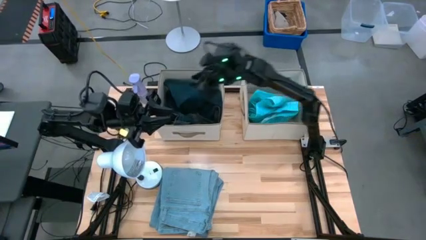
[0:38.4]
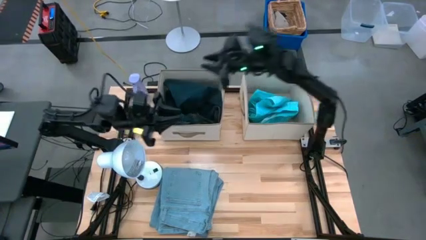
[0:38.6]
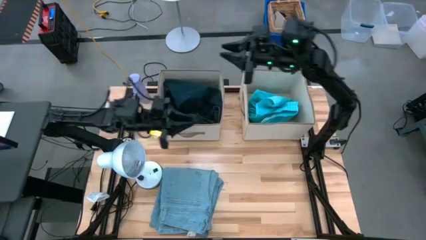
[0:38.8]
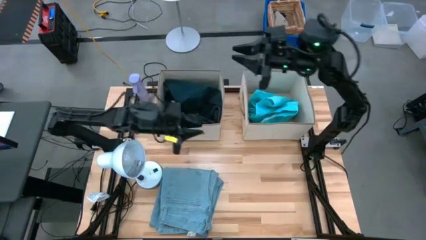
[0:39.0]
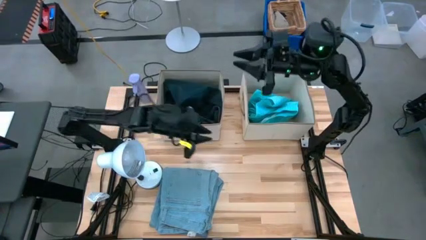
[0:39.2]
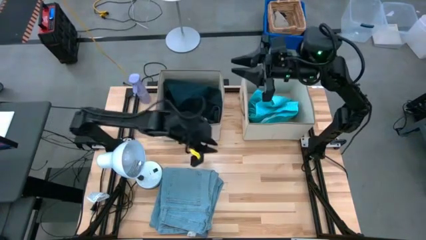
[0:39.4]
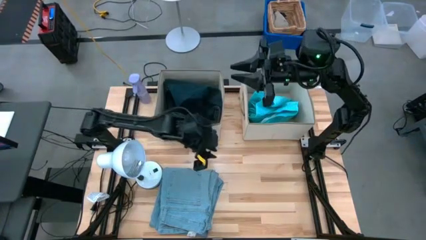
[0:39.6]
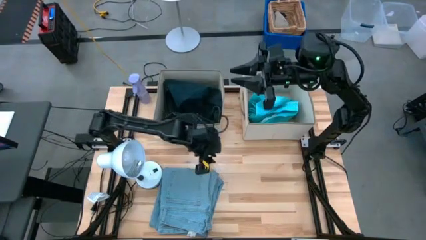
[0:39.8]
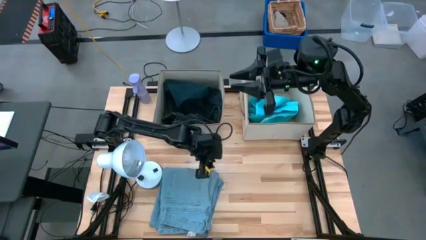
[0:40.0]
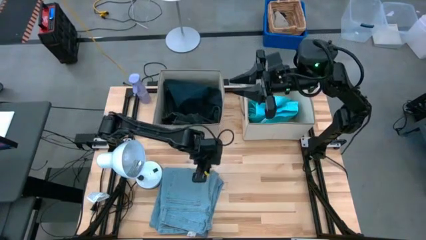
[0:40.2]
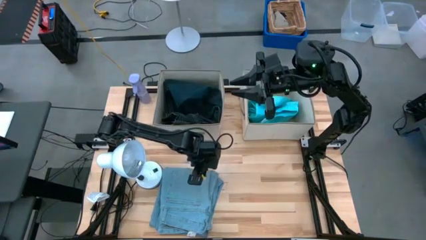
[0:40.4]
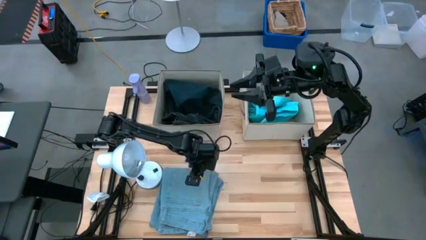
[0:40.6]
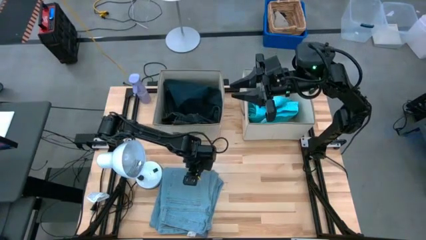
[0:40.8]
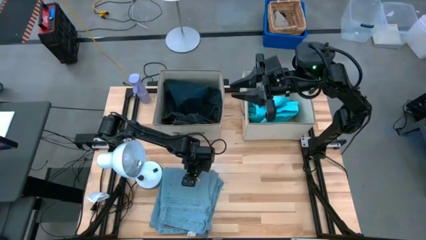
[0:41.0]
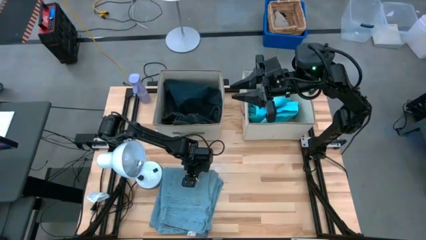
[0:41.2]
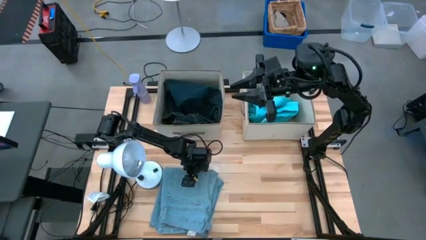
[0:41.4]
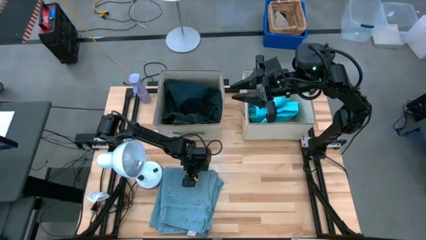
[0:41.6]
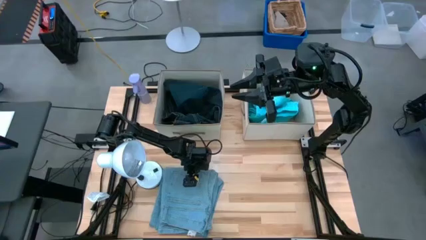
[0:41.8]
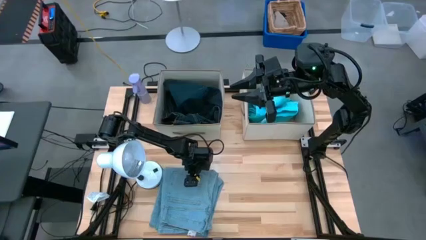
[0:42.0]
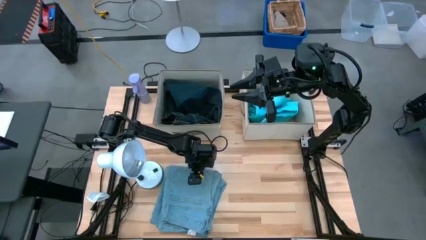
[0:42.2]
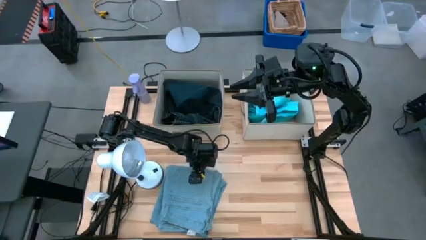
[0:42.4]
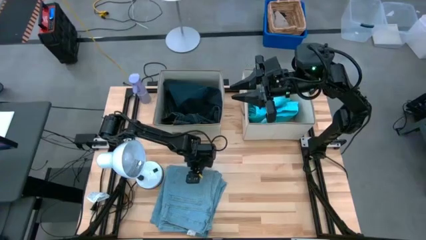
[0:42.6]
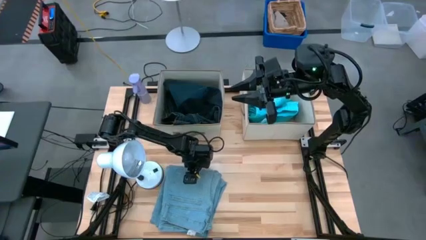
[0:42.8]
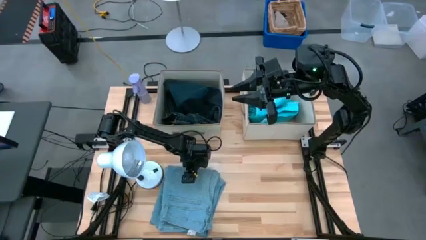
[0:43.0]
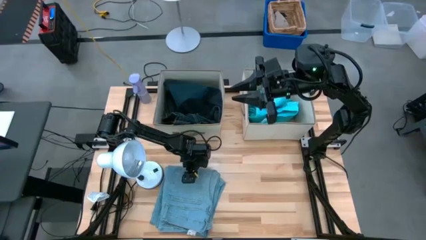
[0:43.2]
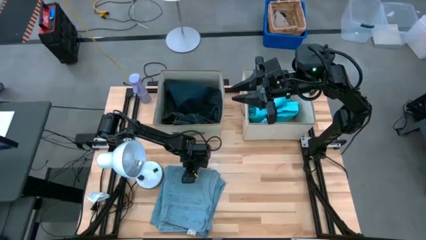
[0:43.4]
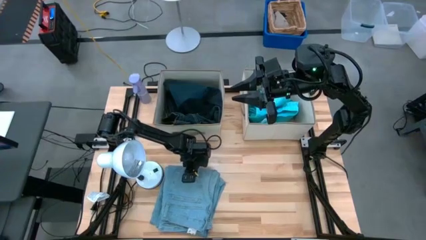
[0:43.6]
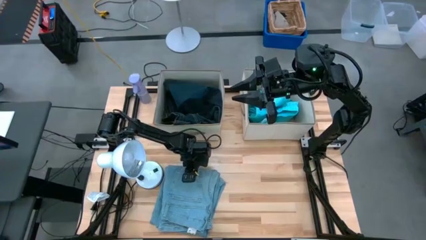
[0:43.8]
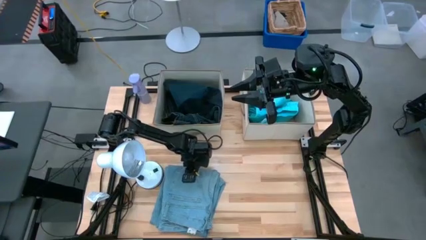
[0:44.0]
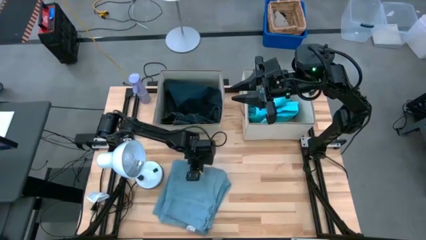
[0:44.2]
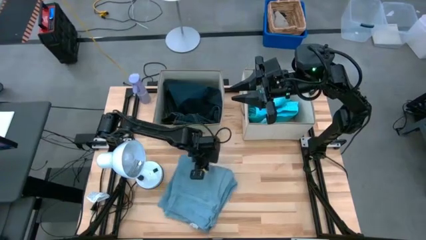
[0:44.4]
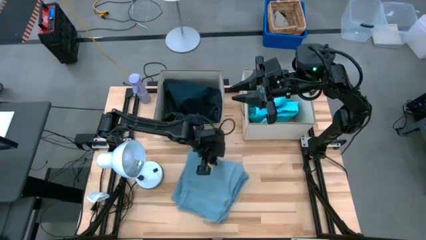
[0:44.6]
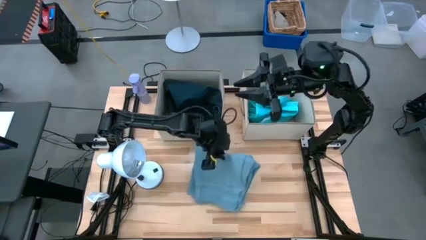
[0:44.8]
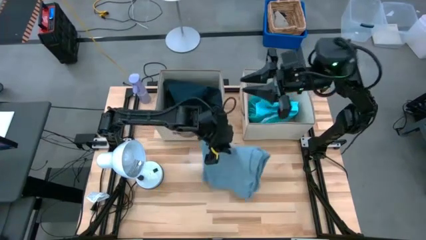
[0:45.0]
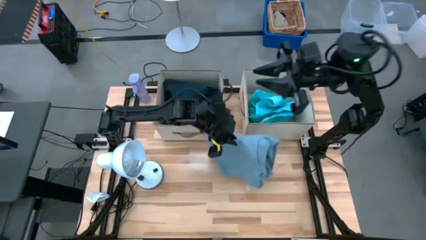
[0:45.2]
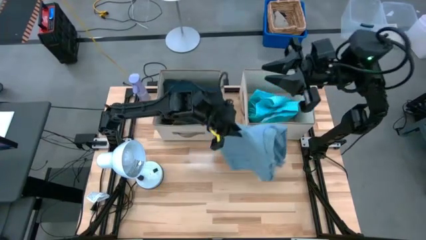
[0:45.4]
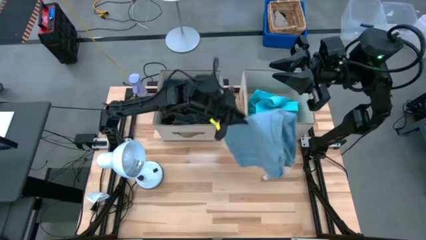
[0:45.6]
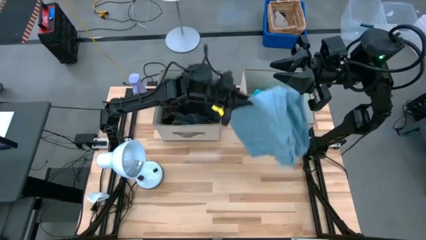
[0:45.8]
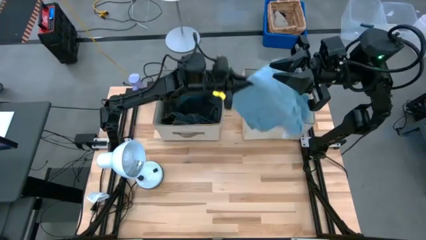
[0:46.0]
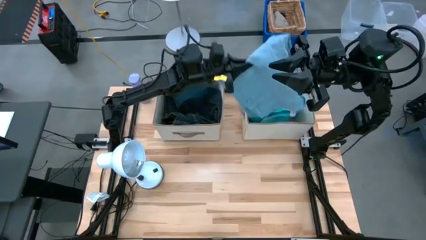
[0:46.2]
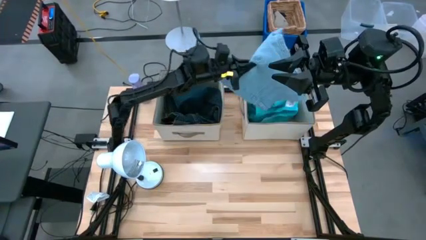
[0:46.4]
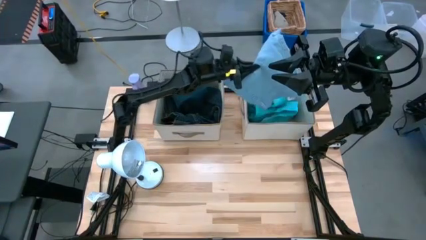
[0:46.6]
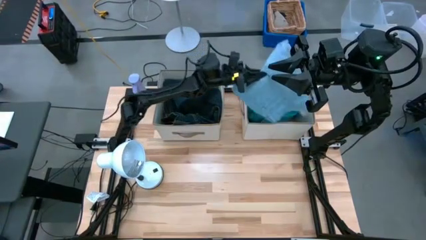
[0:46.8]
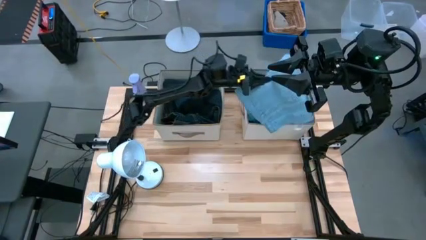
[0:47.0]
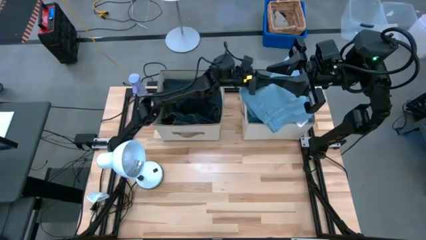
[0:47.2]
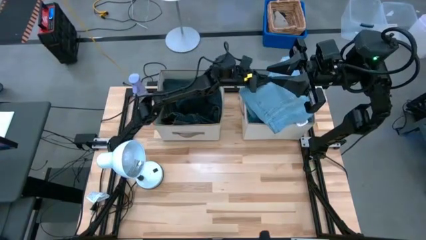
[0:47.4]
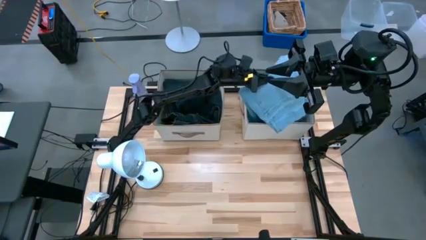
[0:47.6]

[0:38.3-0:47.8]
Task: Sort clothes
Put the blue jeans into the right laundry organizer

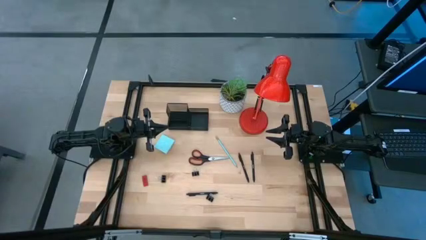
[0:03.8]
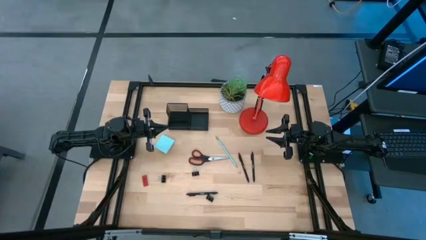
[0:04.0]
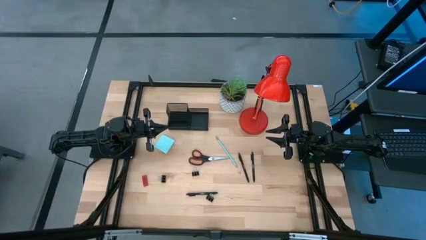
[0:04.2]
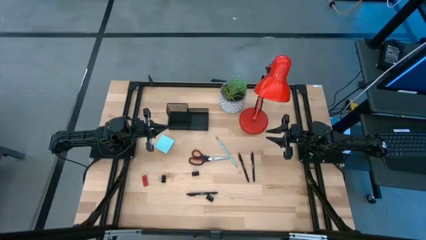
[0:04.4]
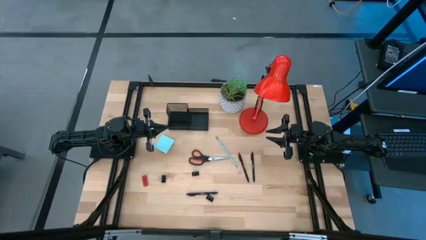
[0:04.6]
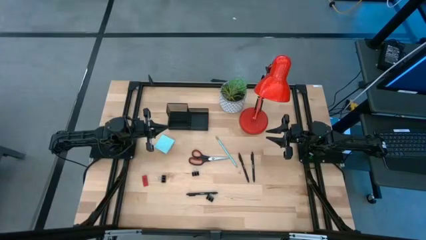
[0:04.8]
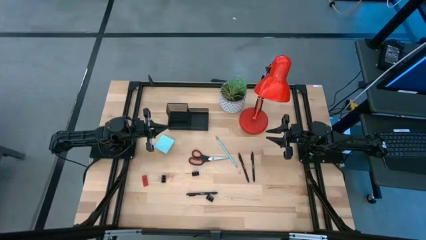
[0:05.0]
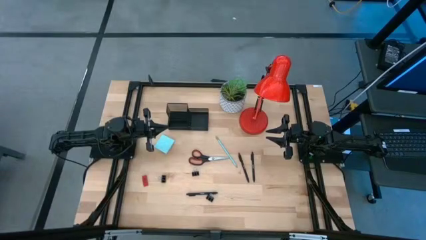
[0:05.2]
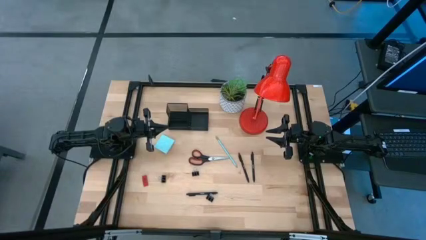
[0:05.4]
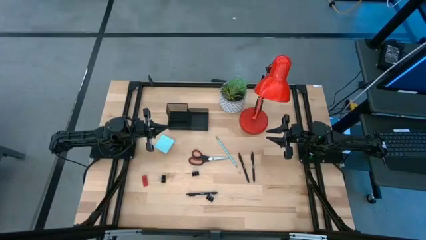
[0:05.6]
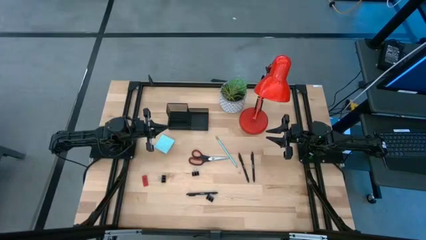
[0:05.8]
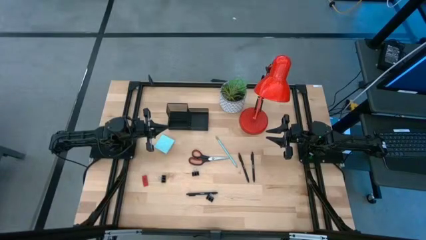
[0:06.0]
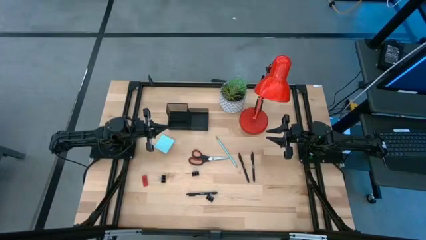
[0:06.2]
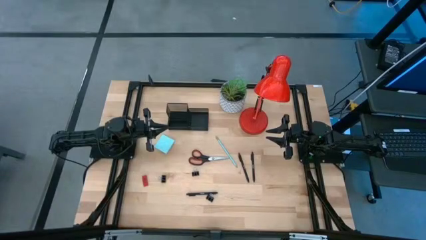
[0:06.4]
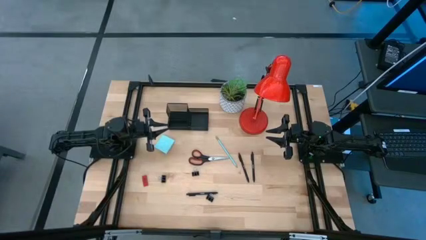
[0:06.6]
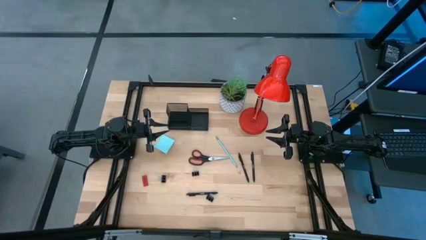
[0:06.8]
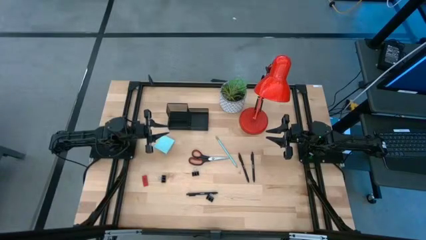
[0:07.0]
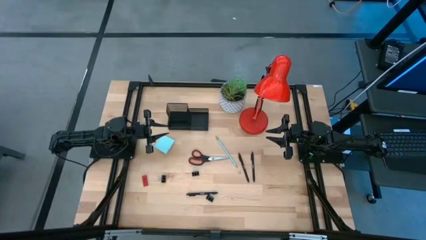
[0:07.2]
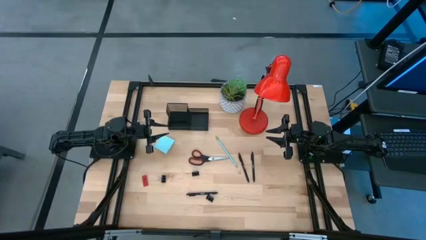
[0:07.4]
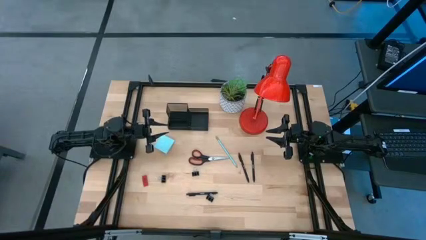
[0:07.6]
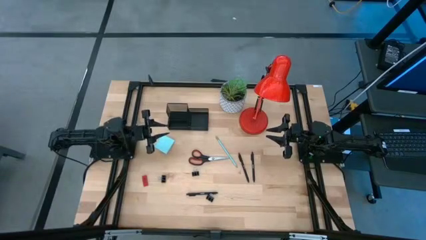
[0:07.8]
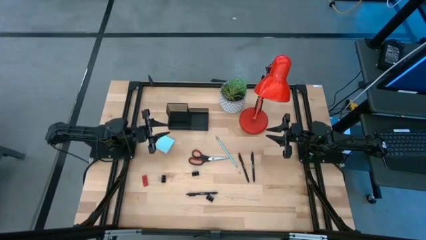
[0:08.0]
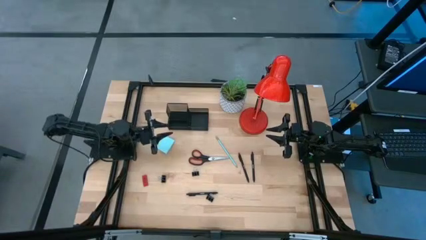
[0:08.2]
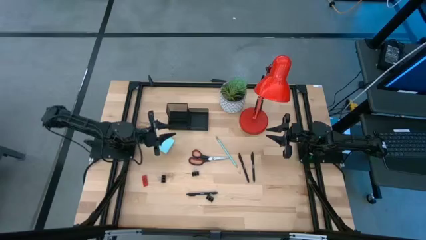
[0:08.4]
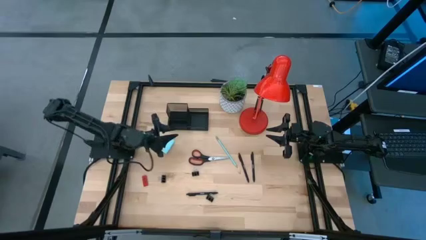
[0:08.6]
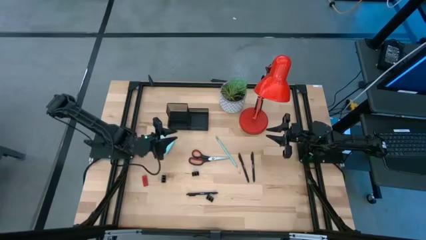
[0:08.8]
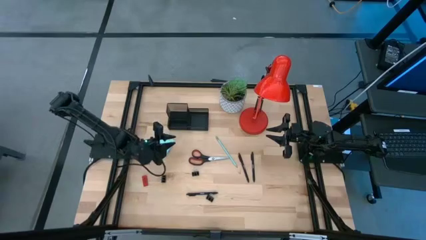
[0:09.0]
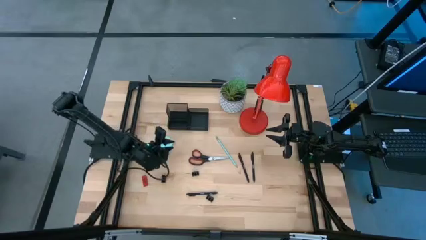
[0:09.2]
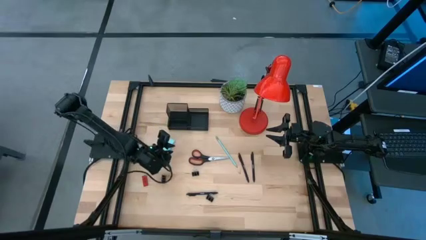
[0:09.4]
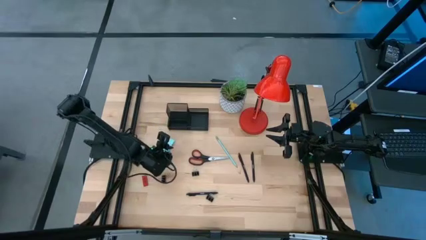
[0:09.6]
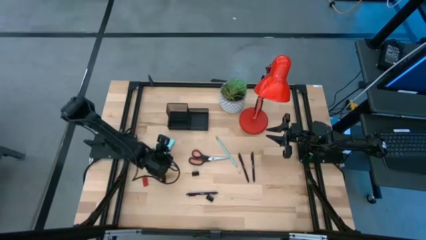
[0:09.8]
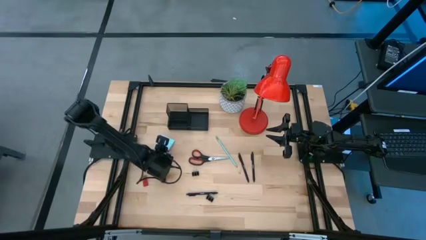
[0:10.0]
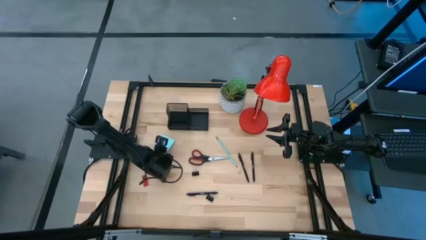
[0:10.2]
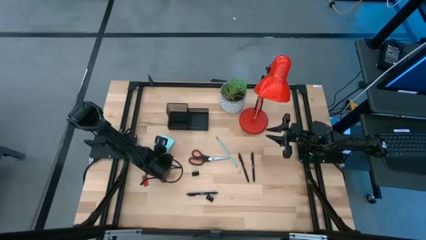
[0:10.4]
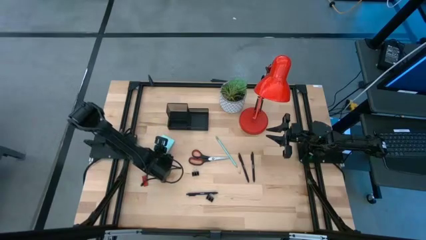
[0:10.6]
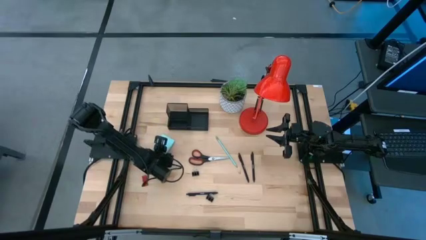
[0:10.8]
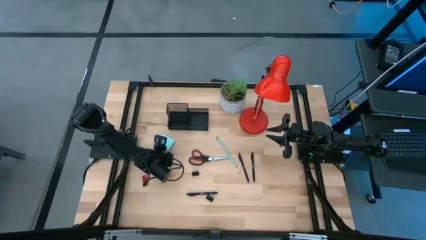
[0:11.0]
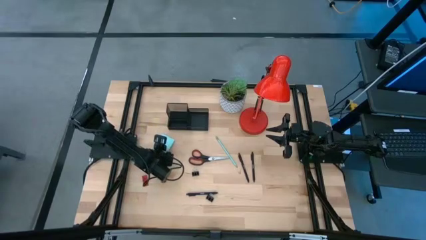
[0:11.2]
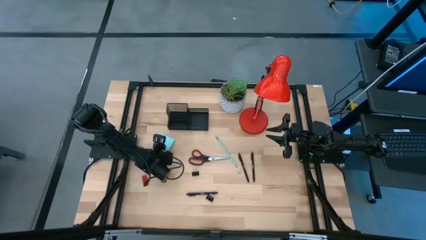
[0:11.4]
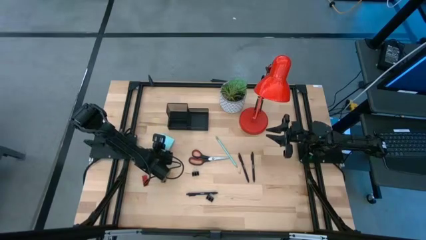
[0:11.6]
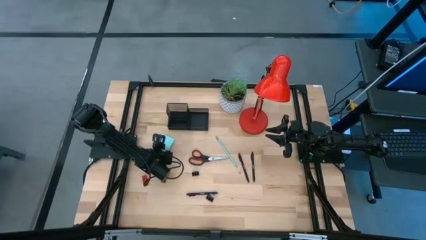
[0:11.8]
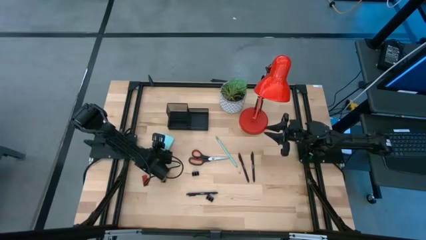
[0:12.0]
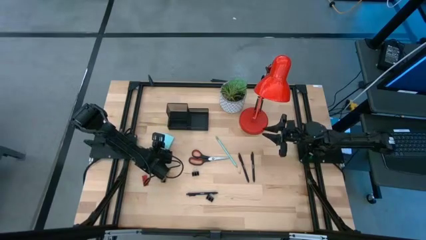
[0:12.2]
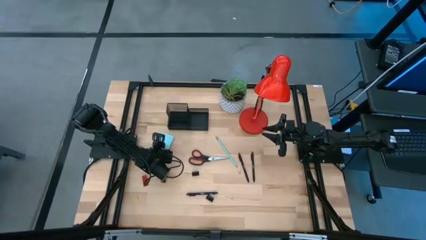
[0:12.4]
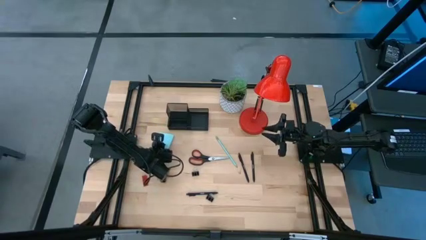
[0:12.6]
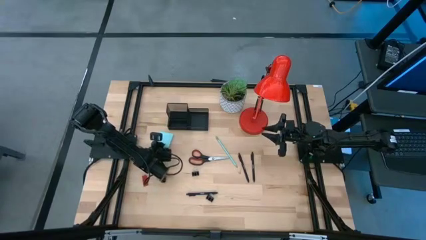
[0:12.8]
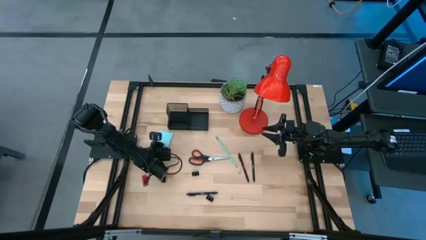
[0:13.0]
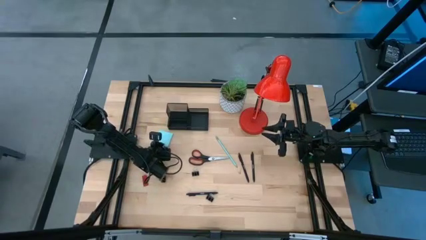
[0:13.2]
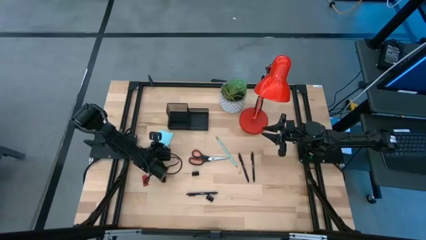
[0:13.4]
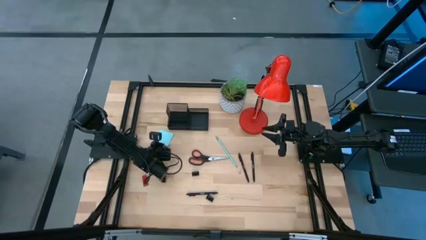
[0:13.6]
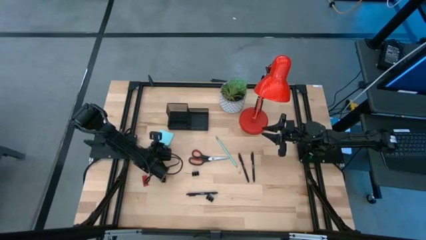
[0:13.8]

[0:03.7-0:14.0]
Task: Pick and place office supplies into organizer
Put the blue sticky note into the black desk organizer
